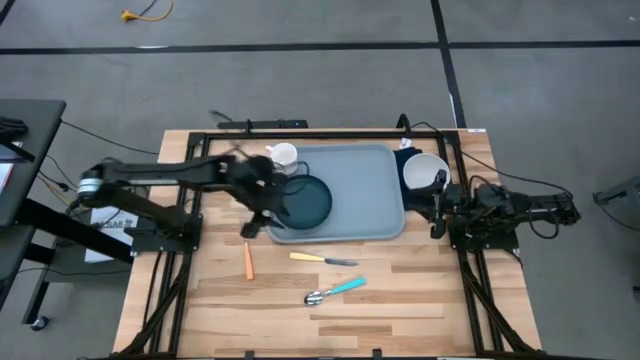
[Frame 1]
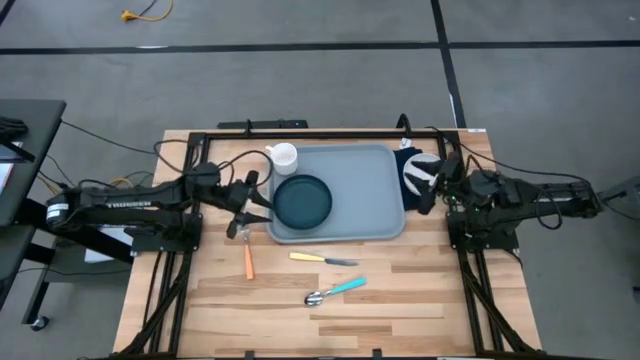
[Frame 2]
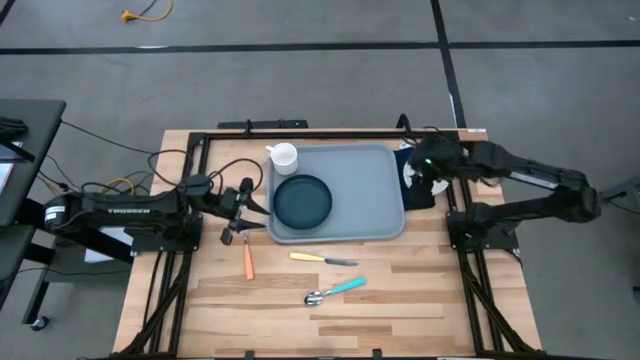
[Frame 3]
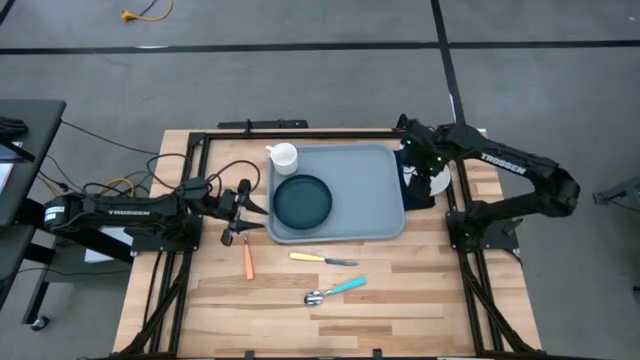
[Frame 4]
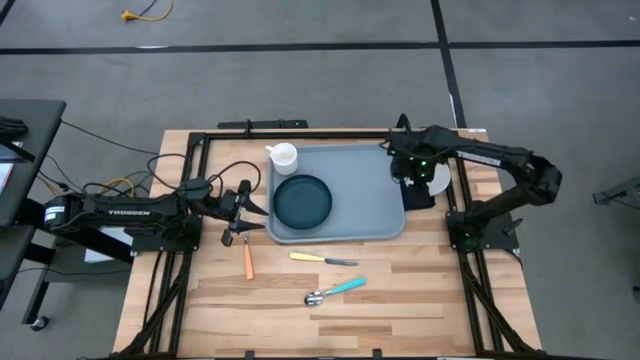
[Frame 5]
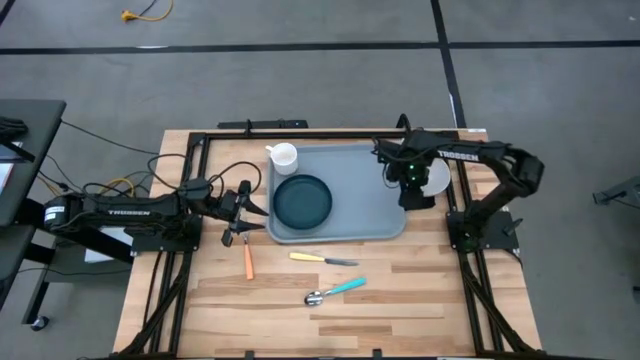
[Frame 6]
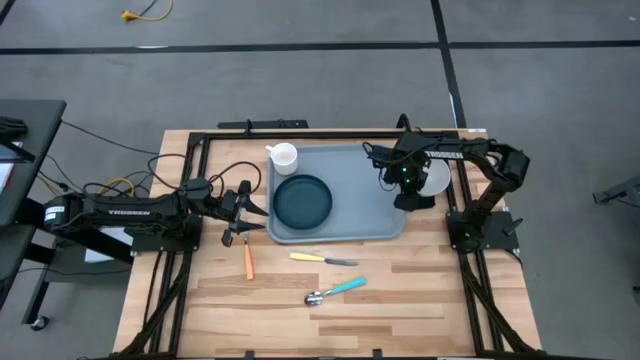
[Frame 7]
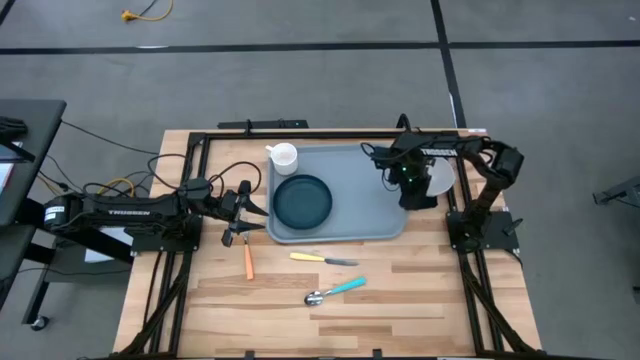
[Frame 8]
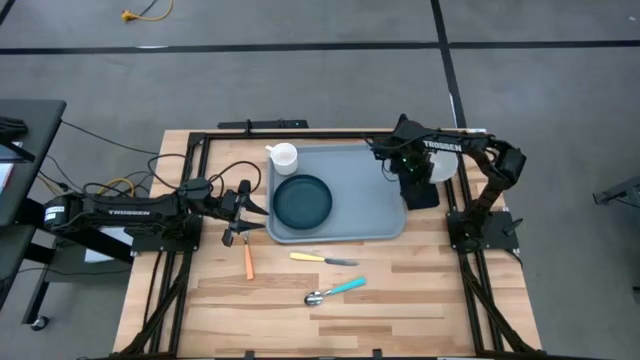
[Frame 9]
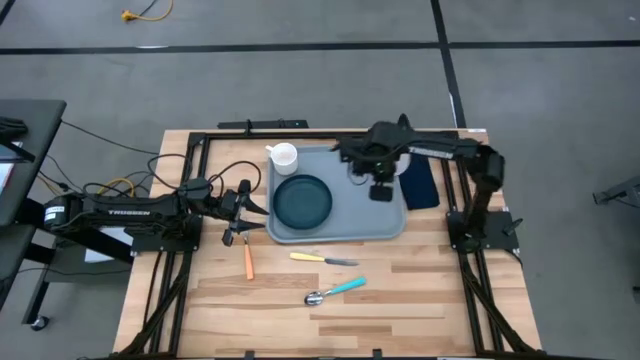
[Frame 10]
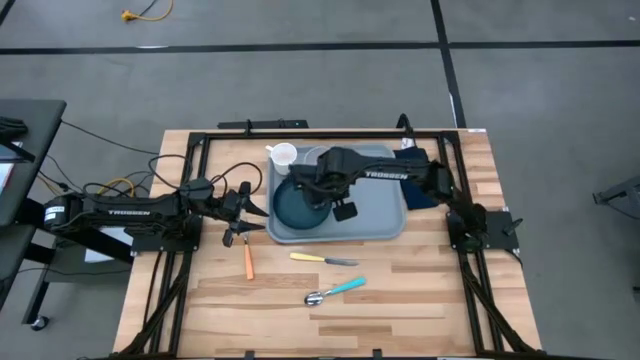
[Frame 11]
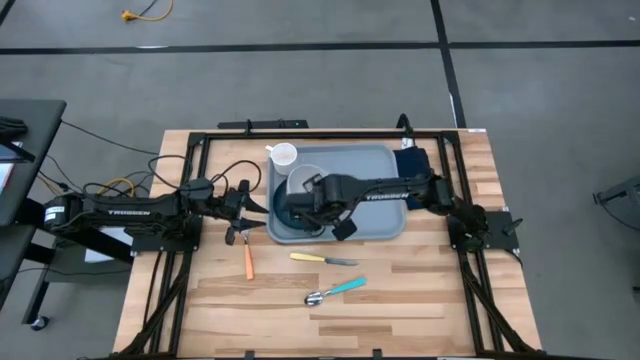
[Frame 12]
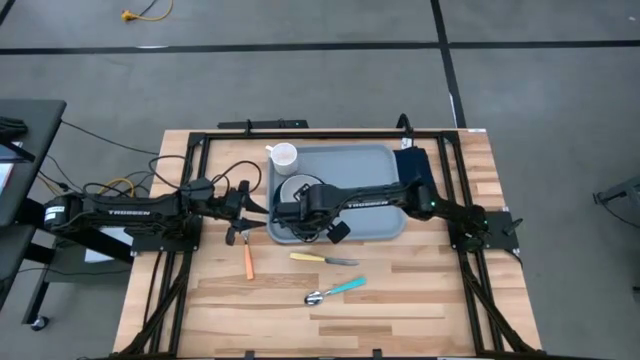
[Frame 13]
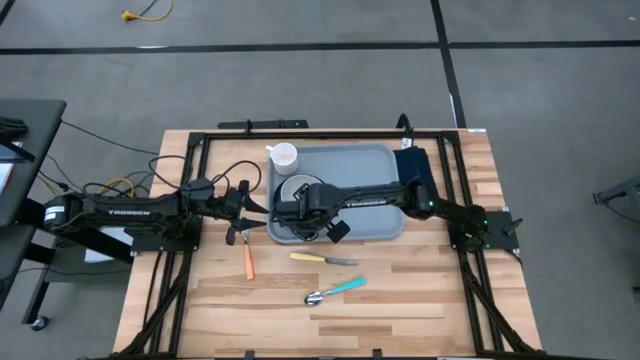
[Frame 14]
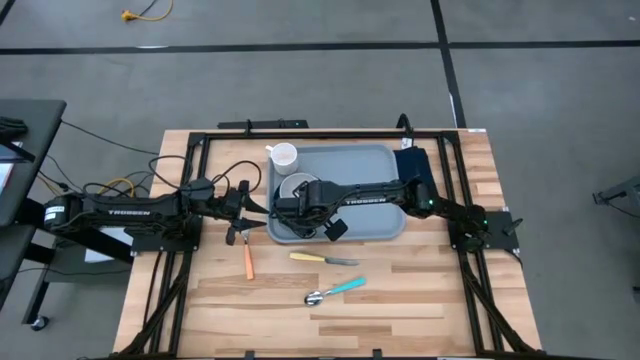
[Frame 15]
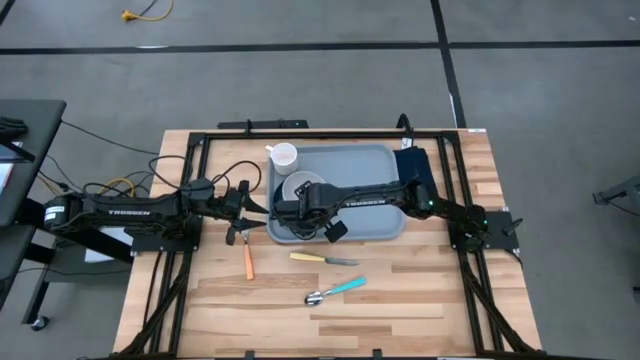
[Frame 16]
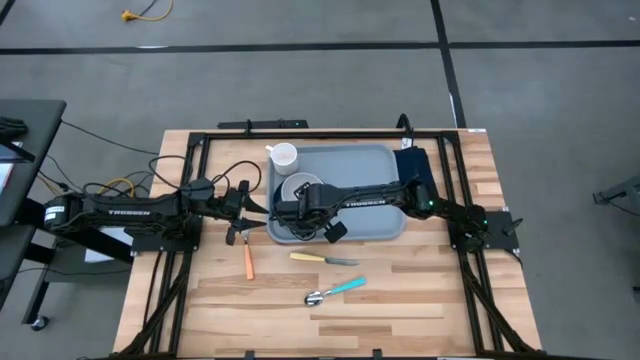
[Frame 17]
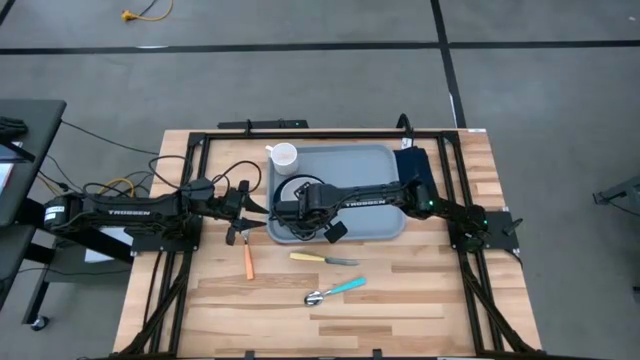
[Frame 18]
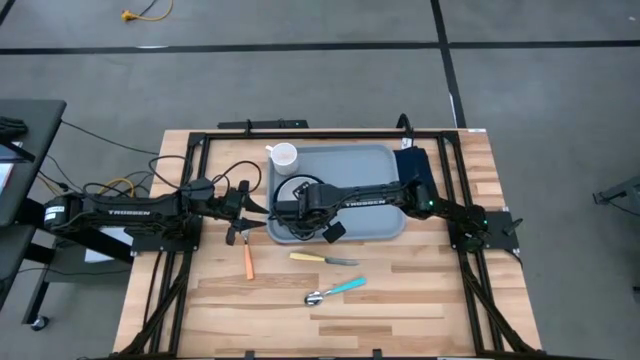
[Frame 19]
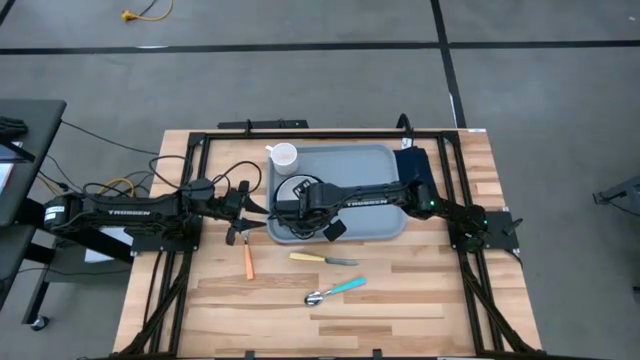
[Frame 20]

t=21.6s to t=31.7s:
Task: Set up tray
Put the white bowl on top of the black plate on the gray tray

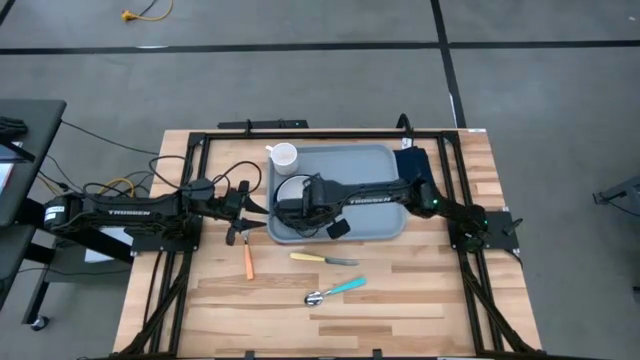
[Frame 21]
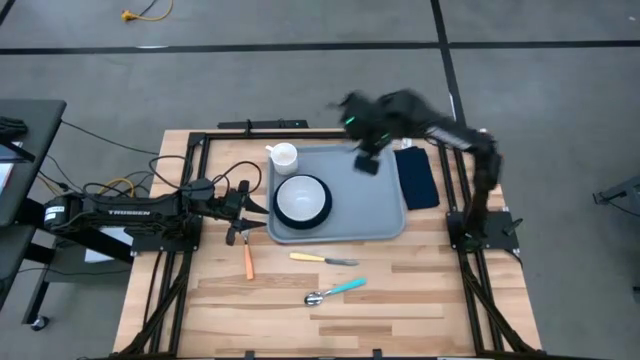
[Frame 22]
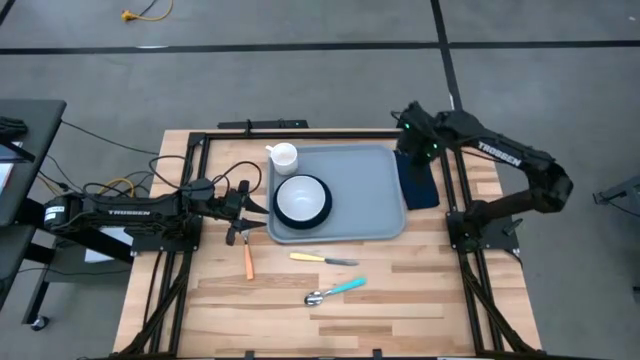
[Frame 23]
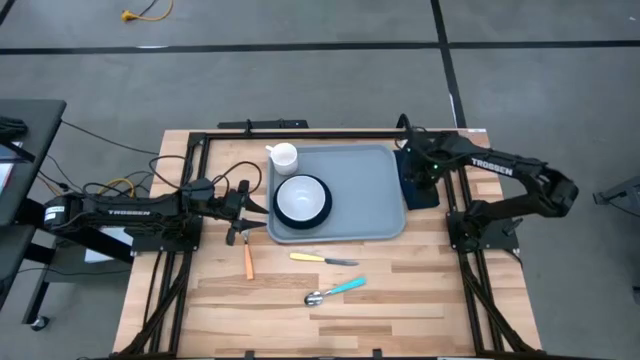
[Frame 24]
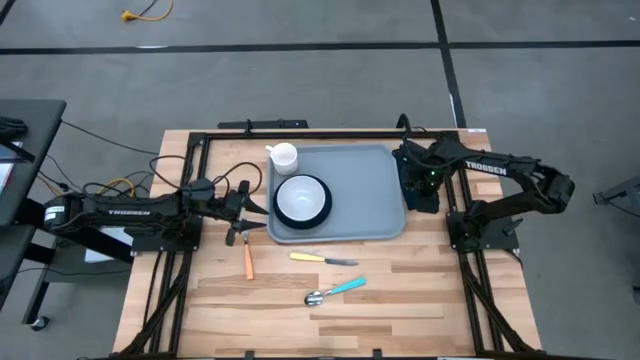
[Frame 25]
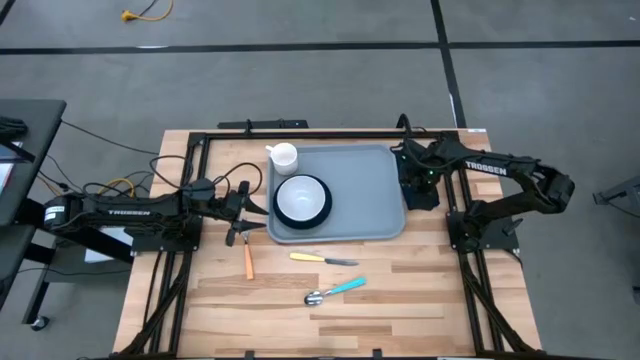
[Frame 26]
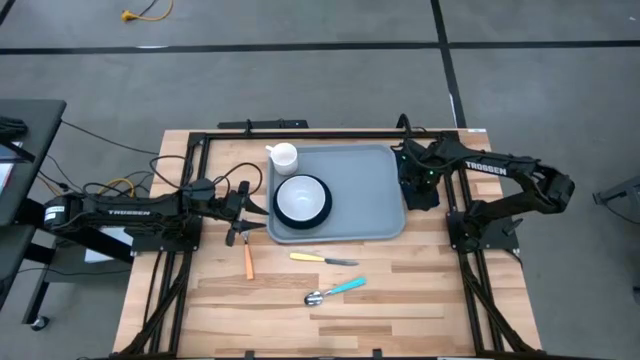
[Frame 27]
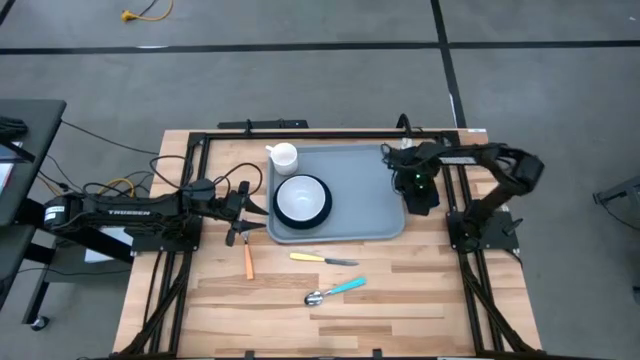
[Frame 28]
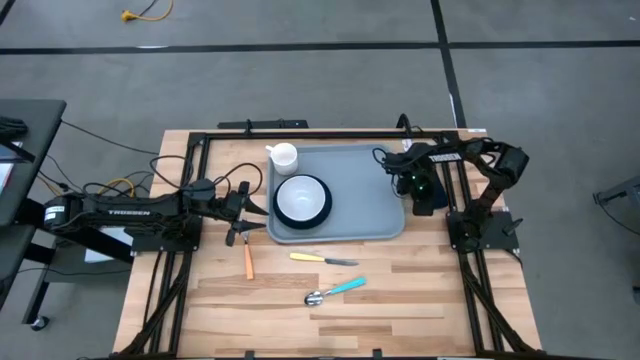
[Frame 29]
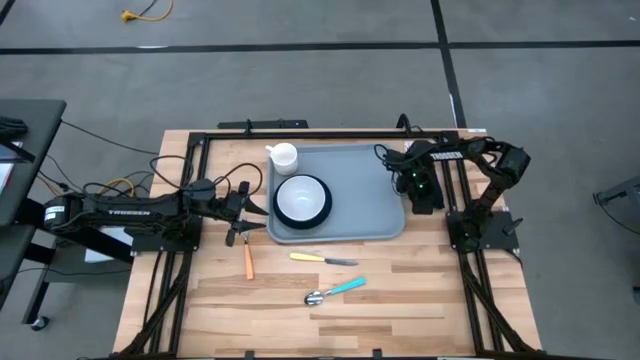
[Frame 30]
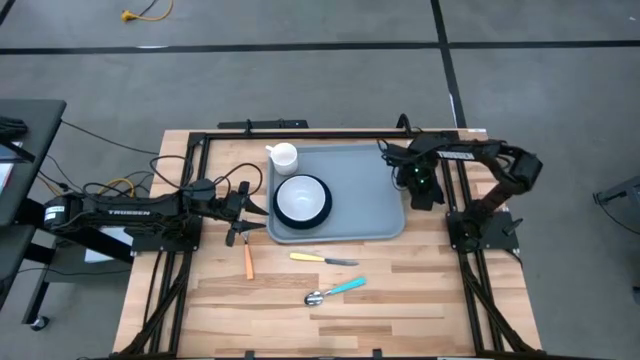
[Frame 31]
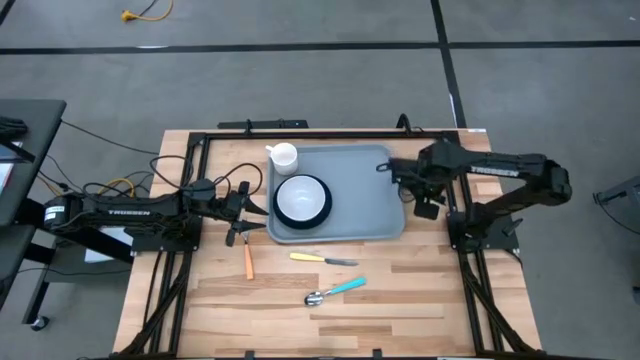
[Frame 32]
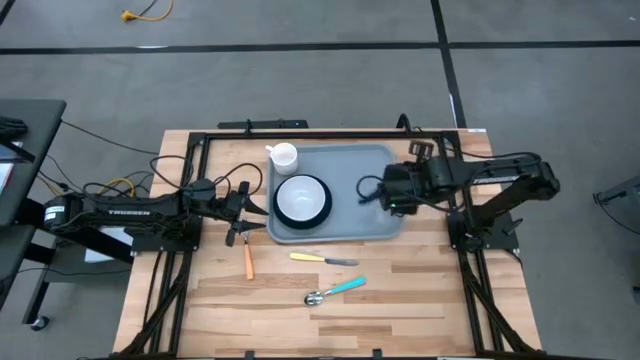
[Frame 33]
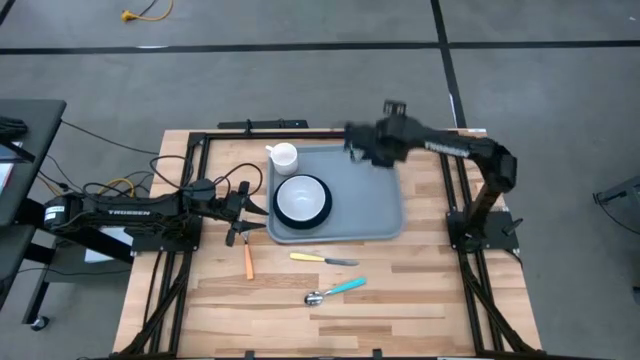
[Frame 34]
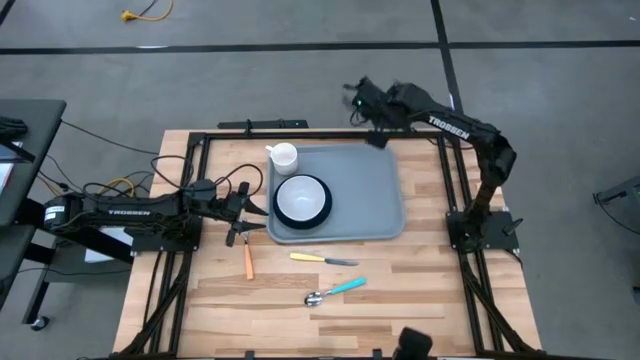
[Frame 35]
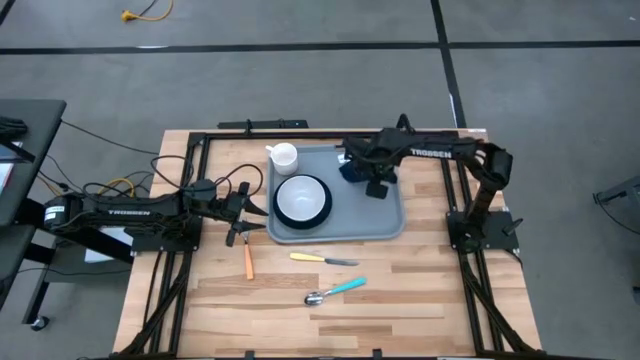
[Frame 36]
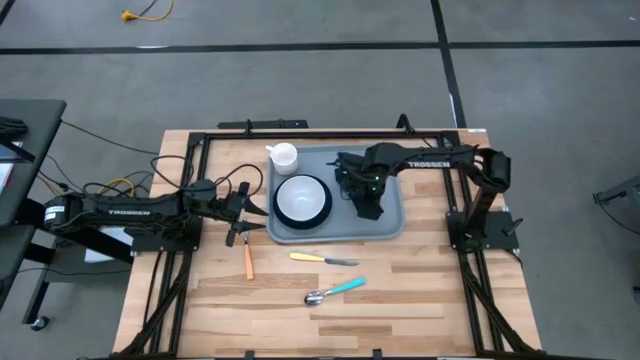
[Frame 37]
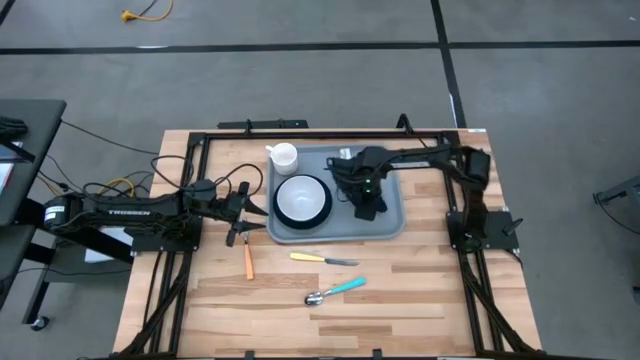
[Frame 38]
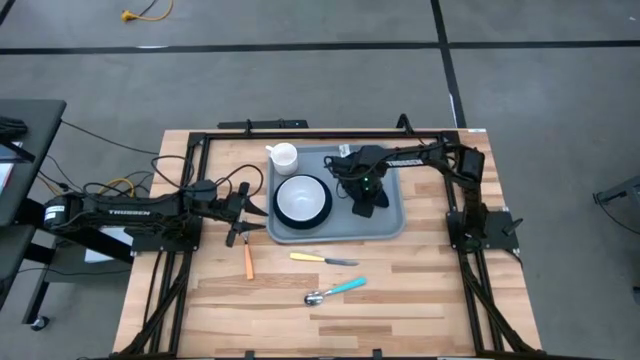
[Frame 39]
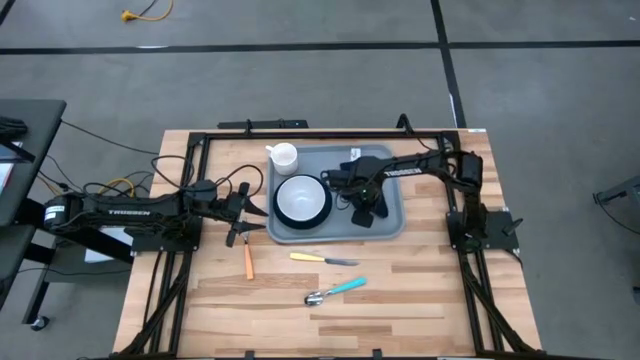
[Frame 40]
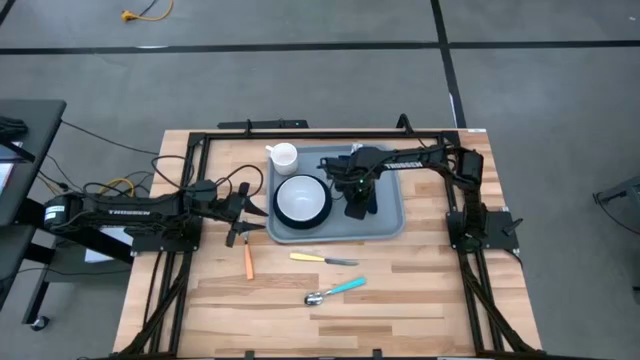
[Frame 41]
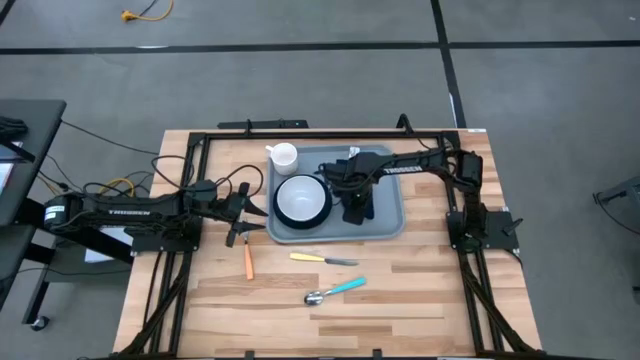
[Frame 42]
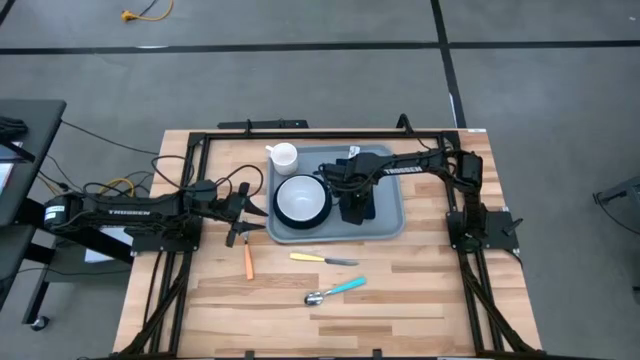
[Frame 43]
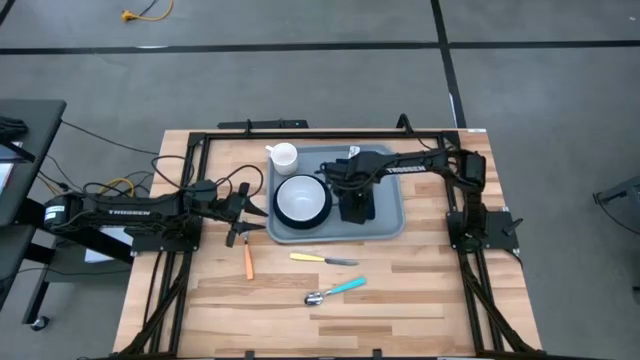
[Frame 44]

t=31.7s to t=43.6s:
Put the black napkin on the gray tray beside the black plate
